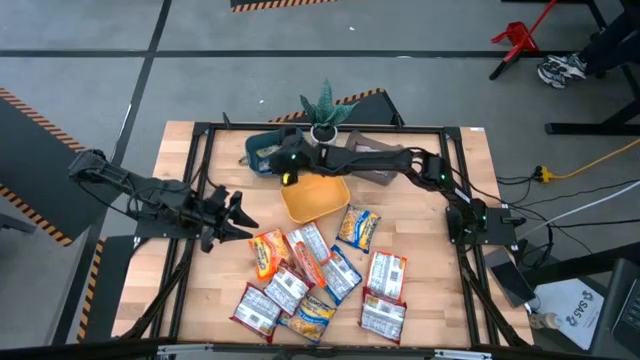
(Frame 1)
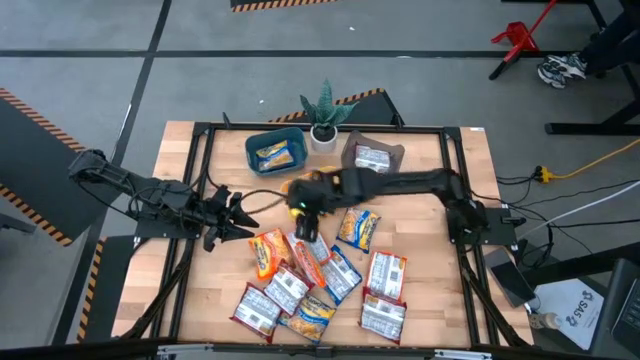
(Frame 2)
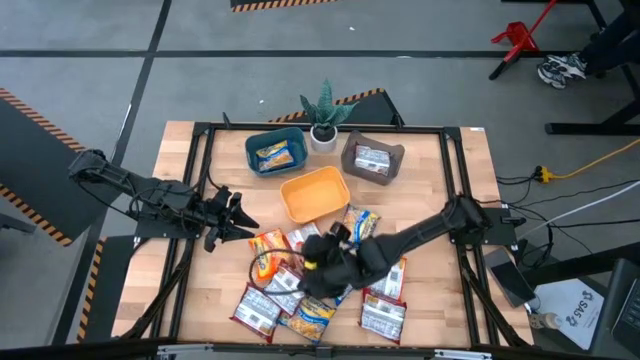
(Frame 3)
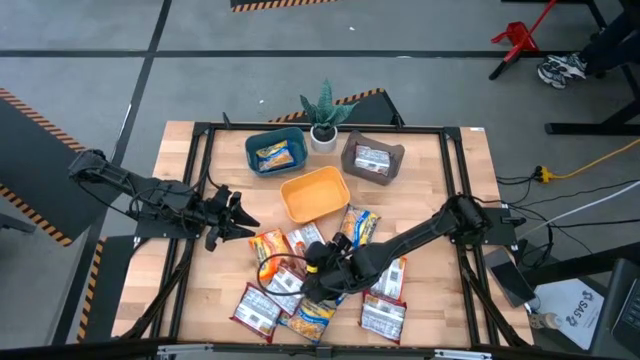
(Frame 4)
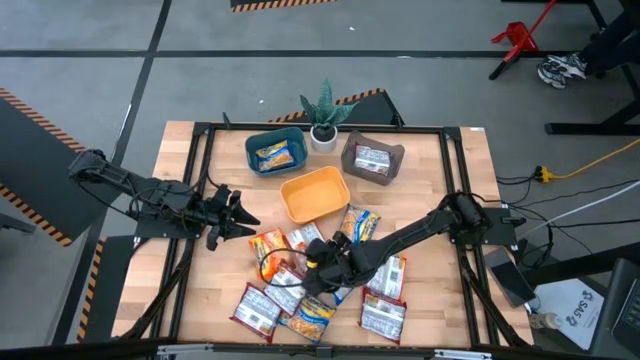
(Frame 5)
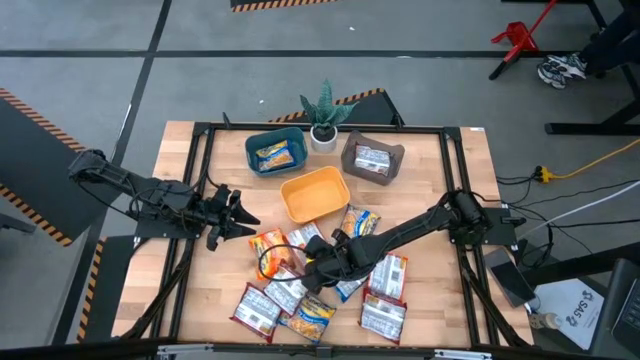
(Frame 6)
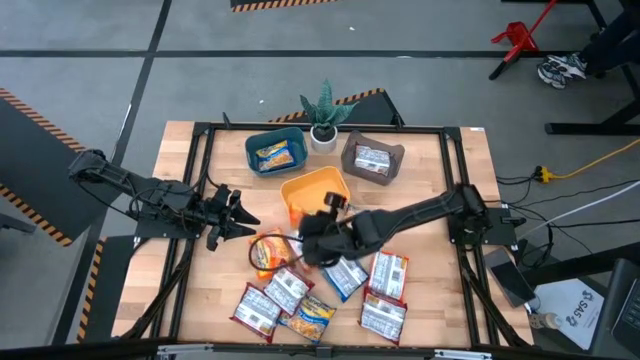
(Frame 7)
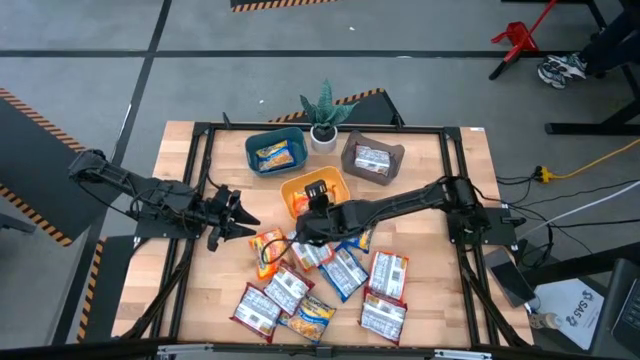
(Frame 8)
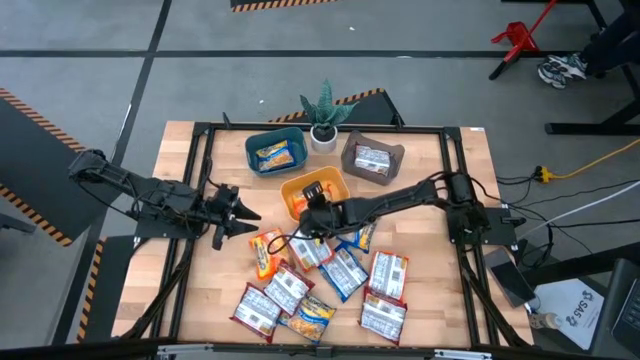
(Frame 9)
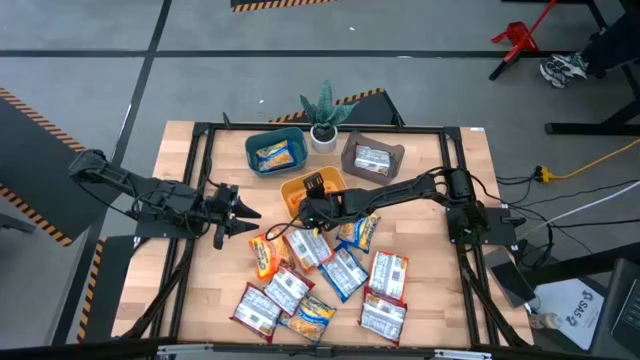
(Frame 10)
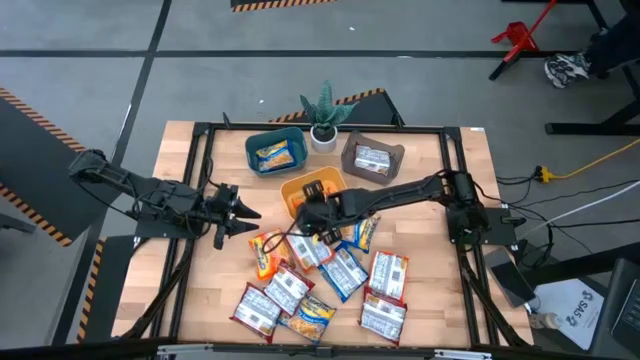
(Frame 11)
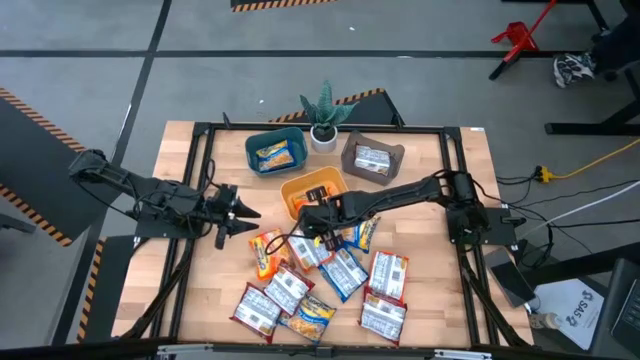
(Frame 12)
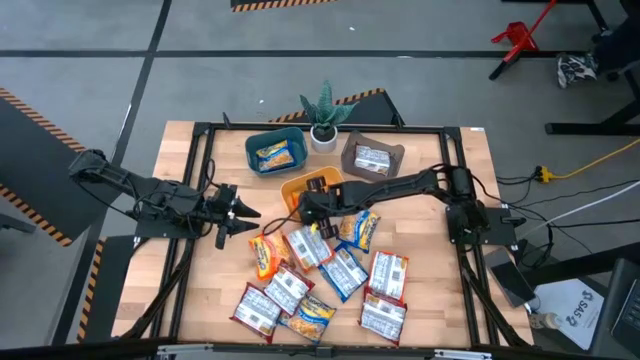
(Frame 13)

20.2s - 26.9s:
Task: Sort Maruchan noodles
Put the orange noodle pack into the yellow bin

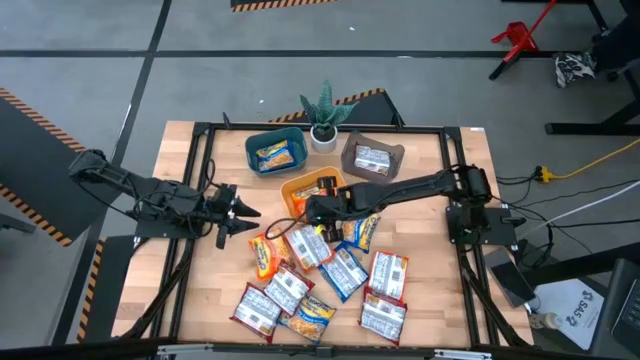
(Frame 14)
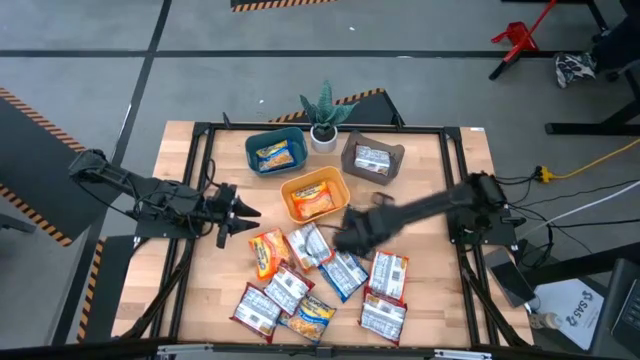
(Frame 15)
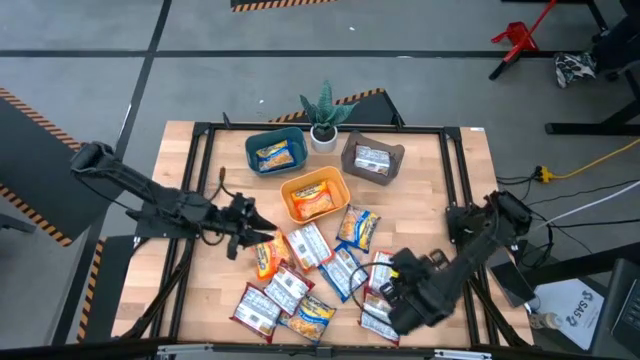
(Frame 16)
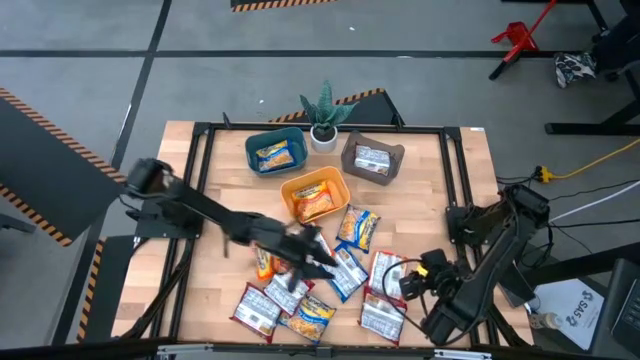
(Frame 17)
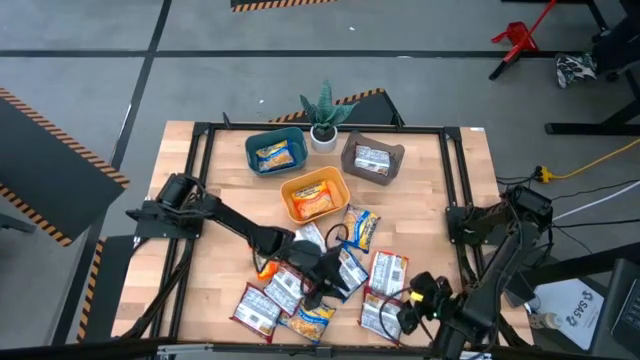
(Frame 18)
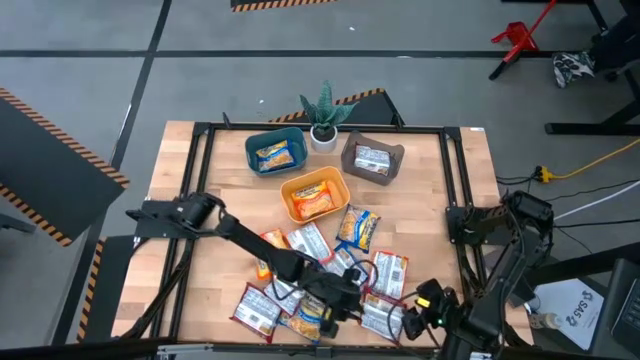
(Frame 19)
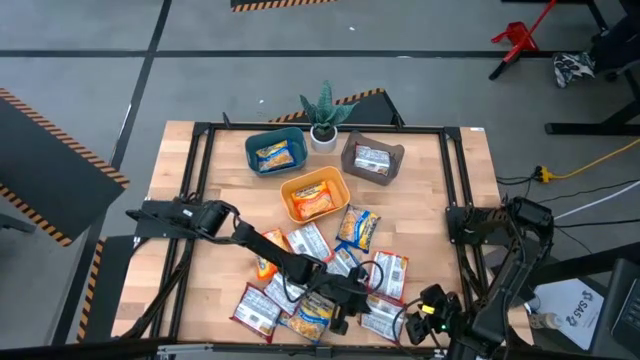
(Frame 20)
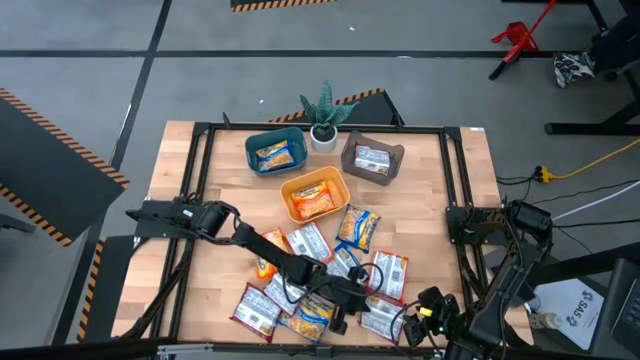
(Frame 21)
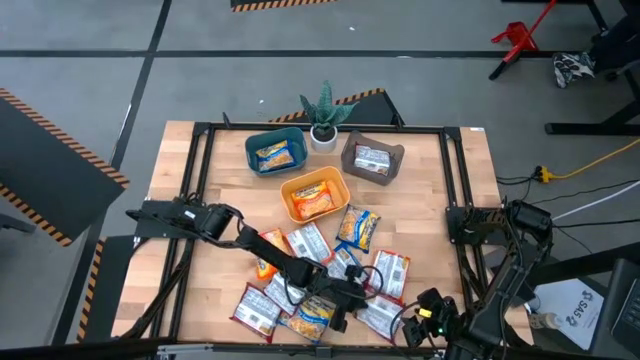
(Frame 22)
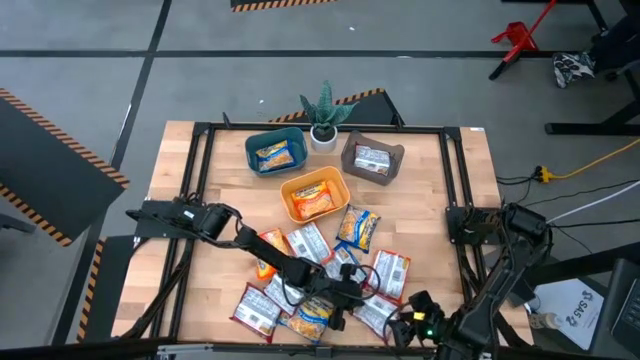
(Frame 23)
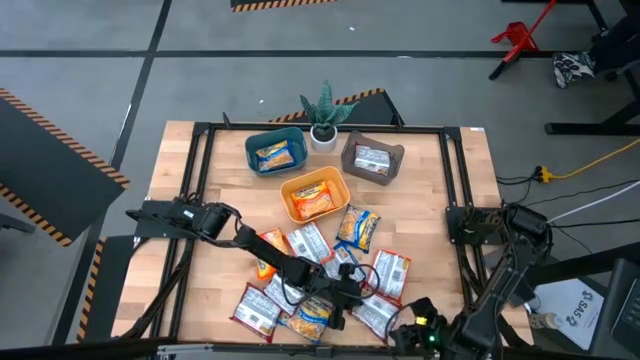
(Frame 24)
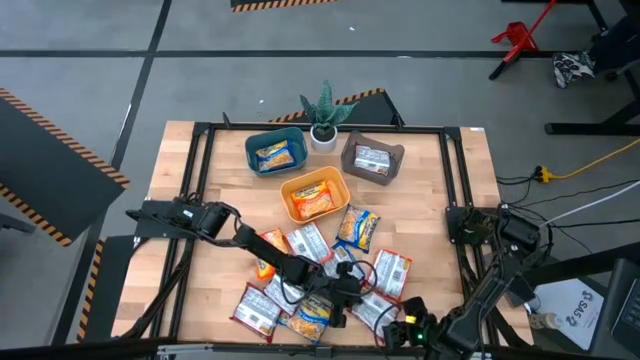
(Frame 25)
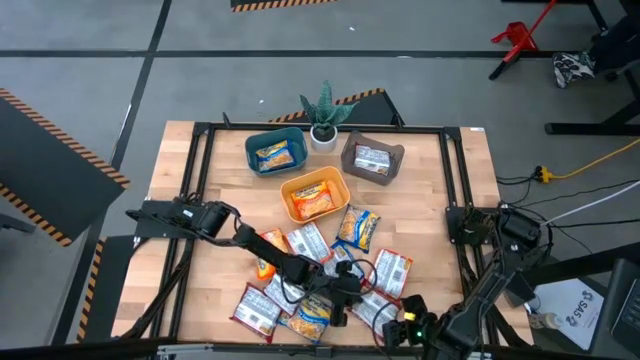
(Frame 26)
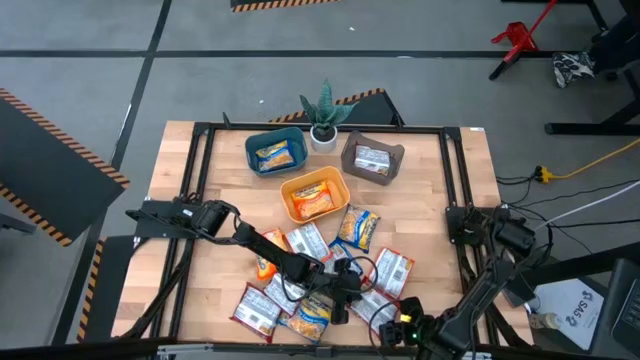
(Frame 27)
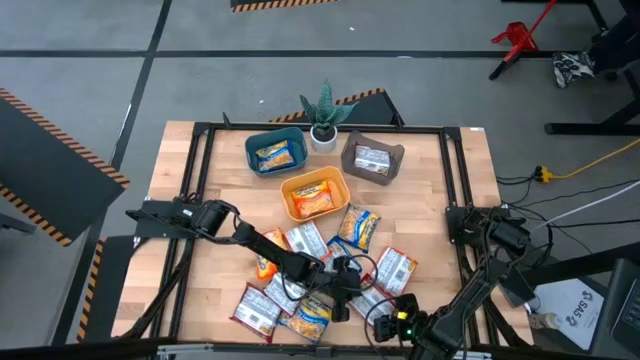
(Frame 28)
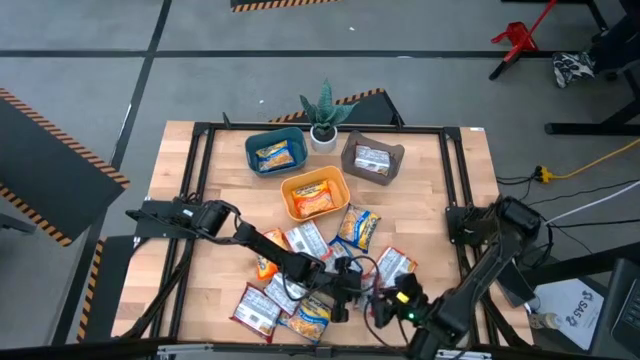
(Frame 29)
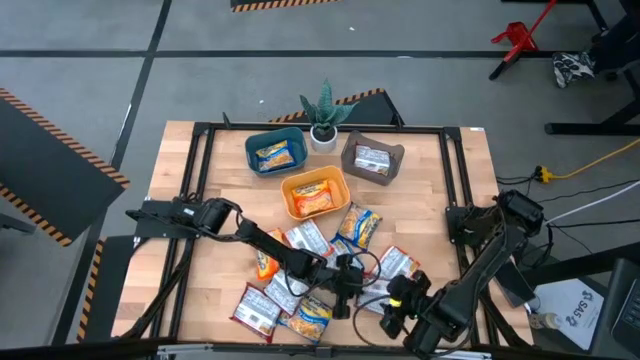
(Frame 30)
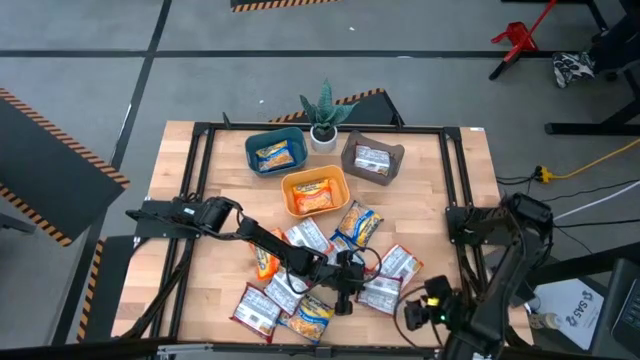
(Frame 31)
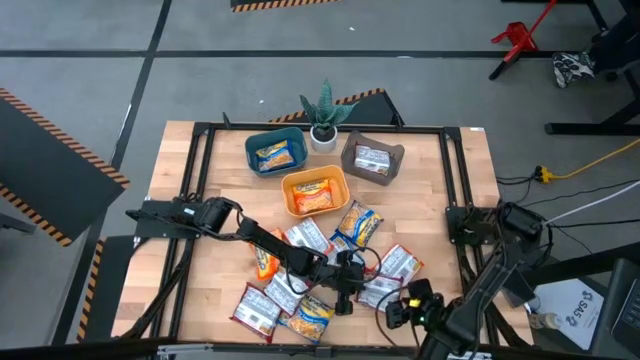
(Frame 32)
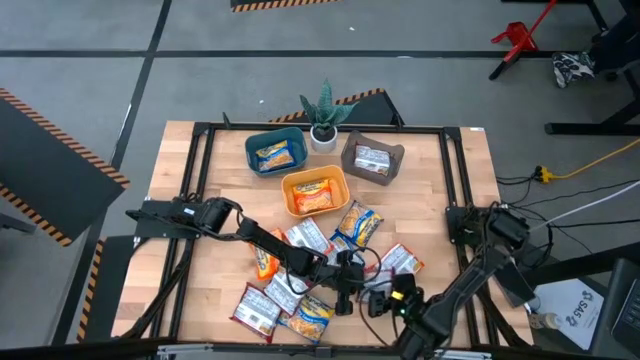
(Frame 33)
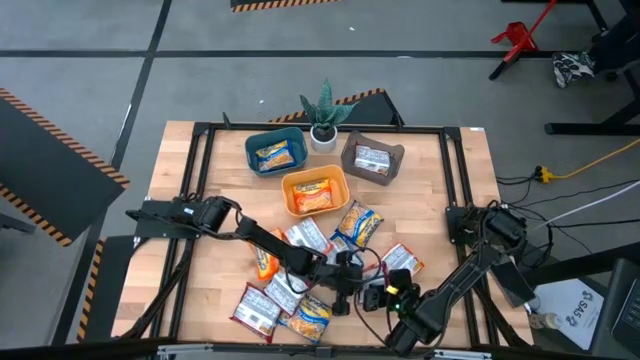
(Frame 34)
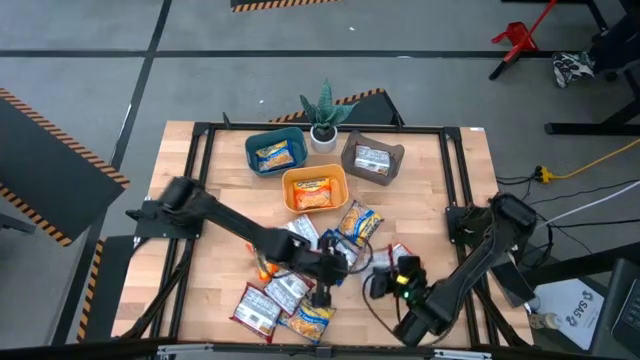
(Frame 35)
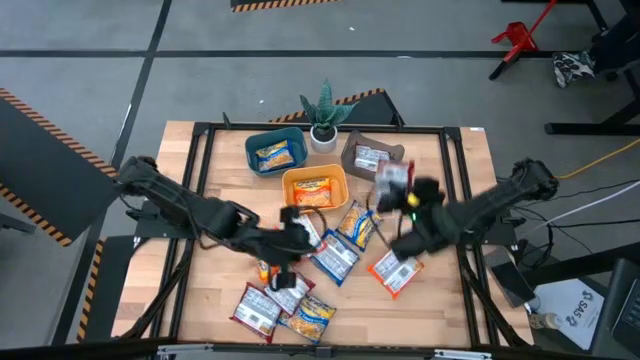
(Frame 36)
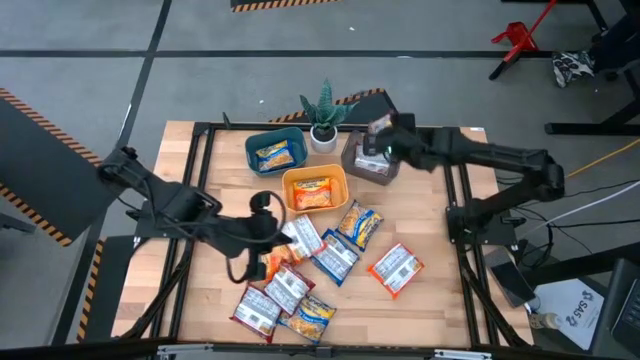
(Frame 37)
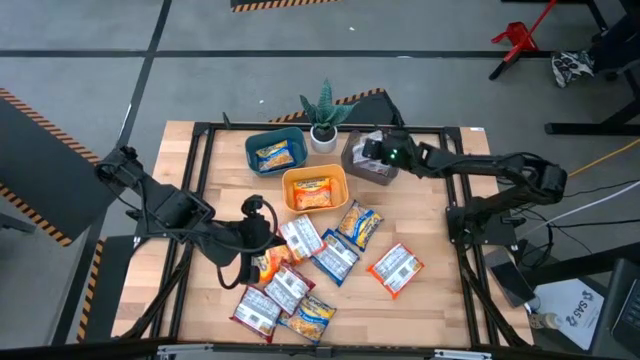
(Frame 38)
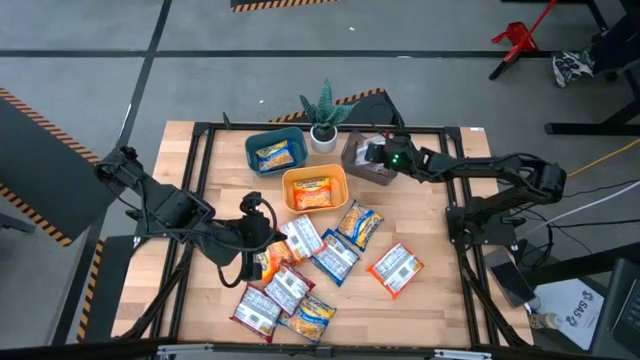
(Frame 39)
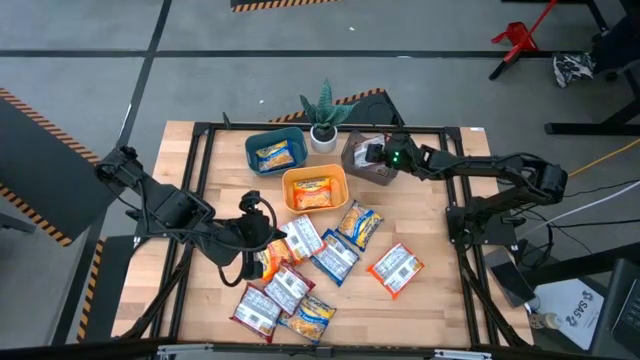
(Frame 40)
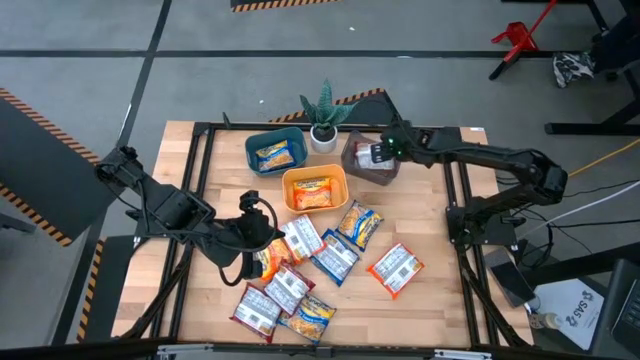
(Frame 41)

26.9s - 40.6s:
Put the right red noodle pack into the black bin
